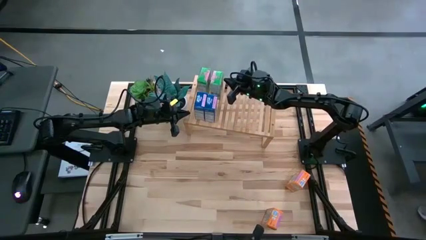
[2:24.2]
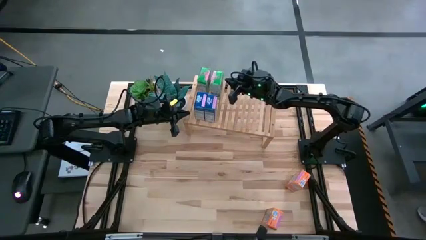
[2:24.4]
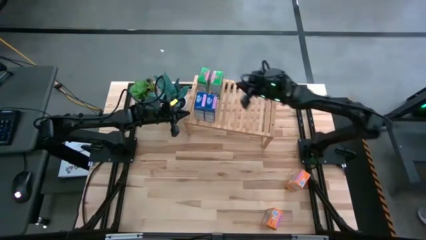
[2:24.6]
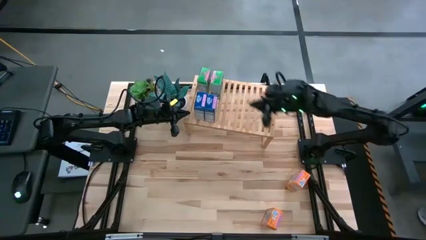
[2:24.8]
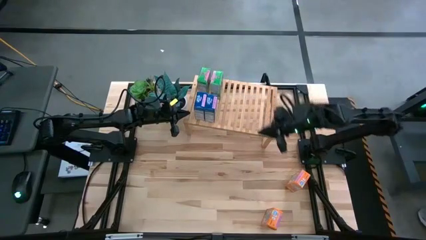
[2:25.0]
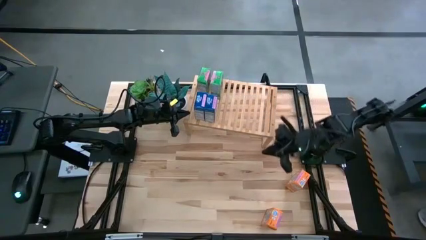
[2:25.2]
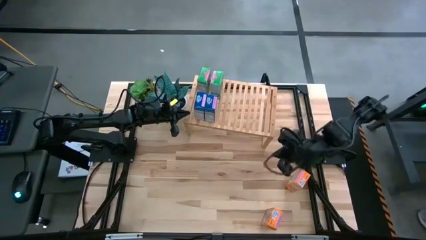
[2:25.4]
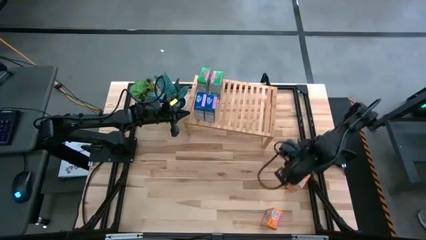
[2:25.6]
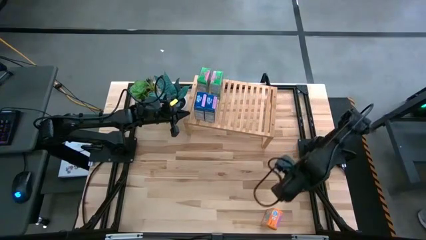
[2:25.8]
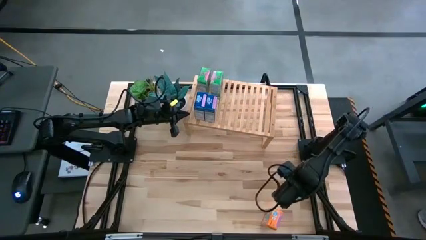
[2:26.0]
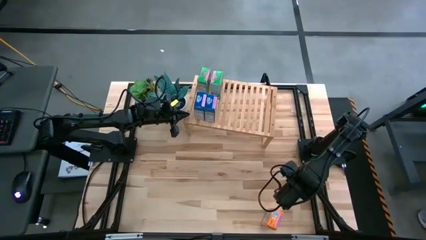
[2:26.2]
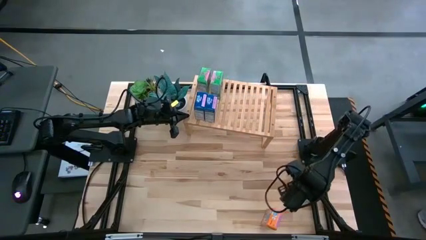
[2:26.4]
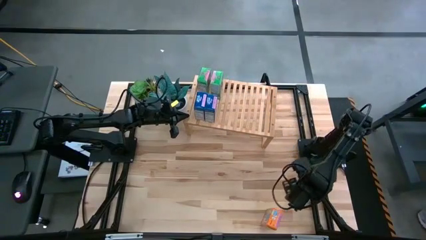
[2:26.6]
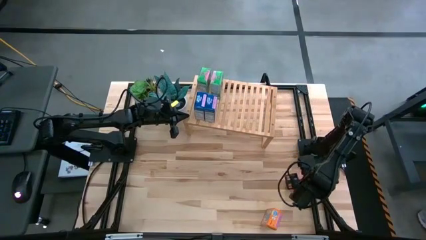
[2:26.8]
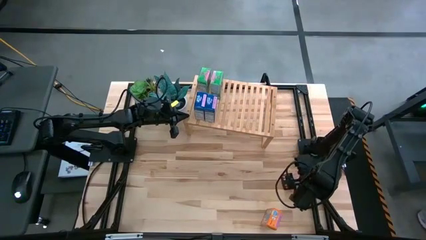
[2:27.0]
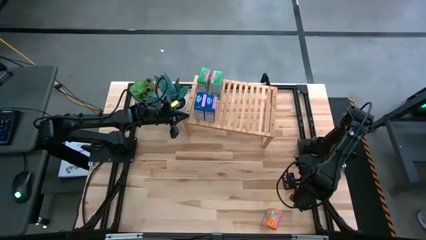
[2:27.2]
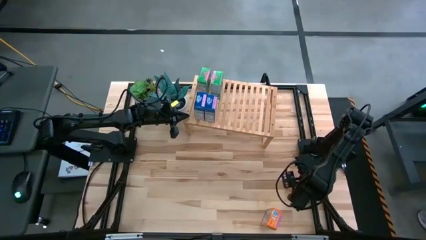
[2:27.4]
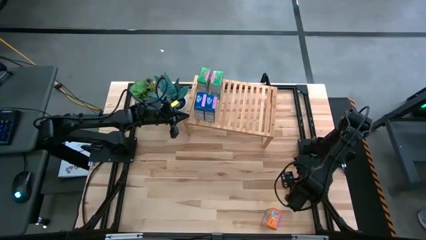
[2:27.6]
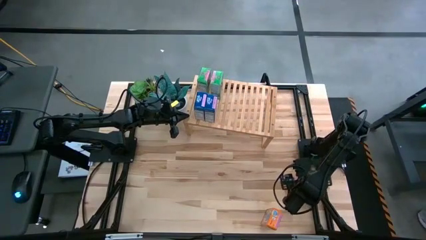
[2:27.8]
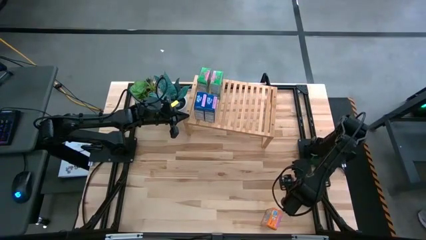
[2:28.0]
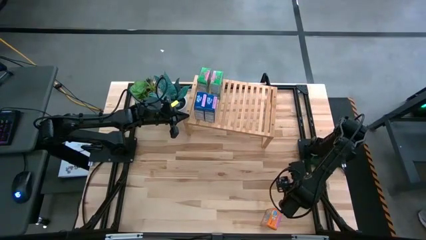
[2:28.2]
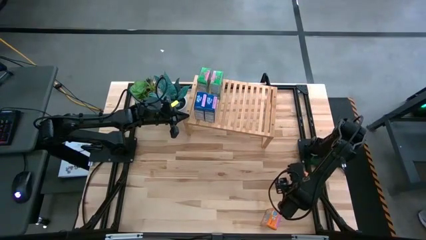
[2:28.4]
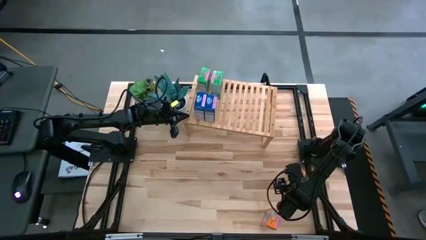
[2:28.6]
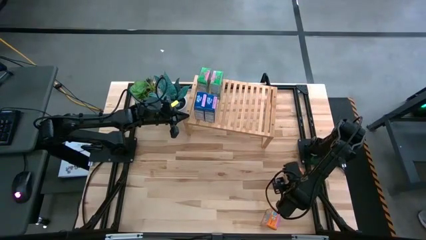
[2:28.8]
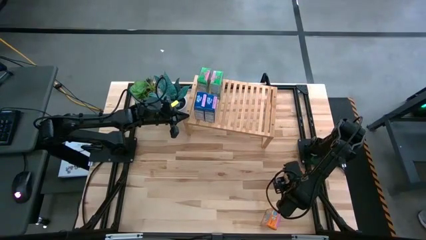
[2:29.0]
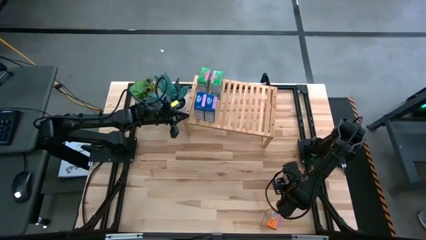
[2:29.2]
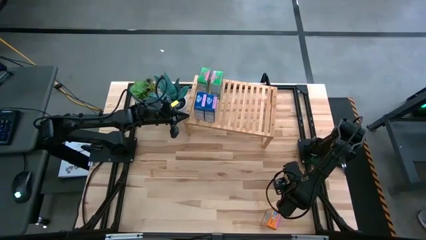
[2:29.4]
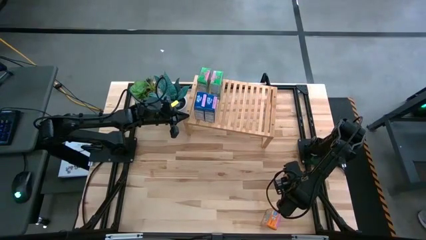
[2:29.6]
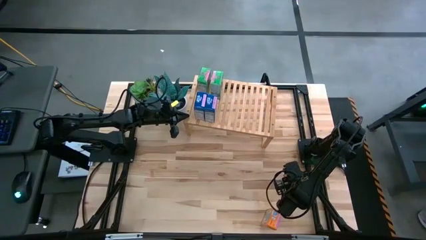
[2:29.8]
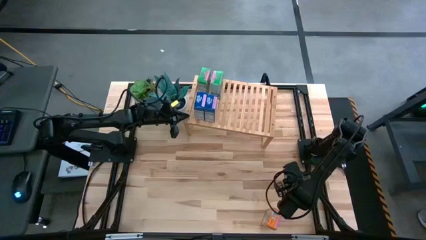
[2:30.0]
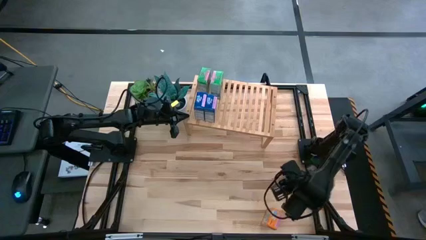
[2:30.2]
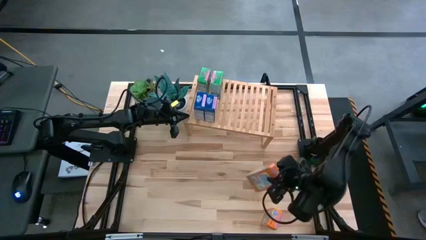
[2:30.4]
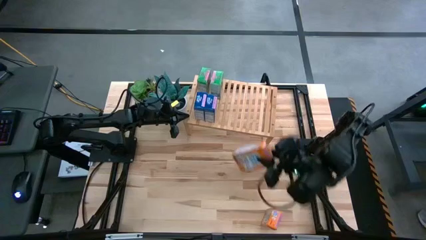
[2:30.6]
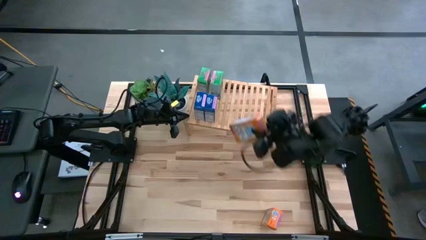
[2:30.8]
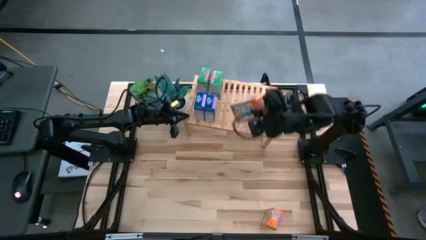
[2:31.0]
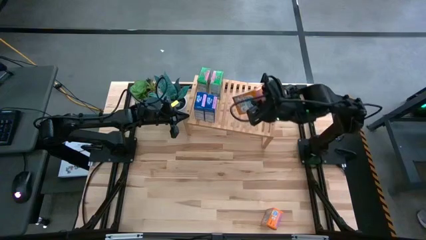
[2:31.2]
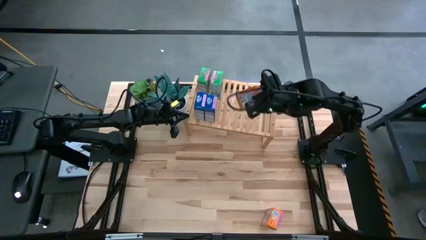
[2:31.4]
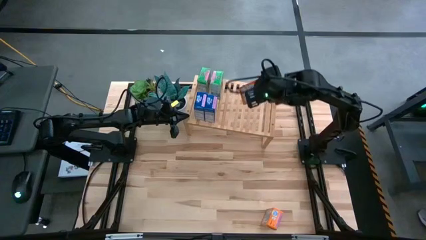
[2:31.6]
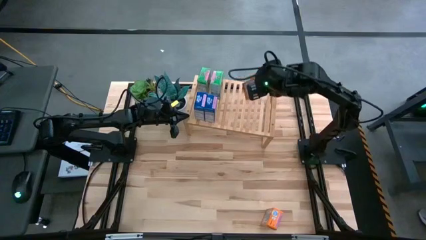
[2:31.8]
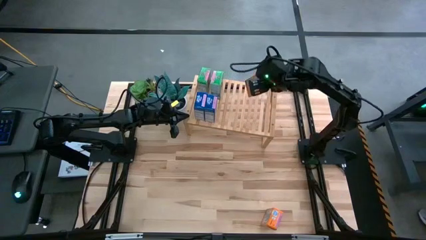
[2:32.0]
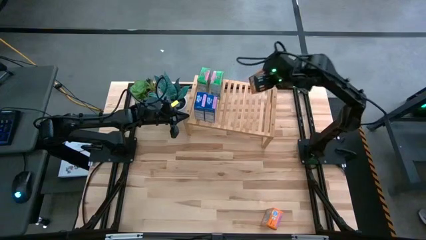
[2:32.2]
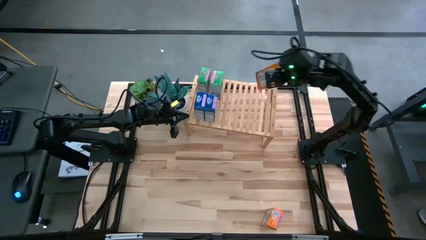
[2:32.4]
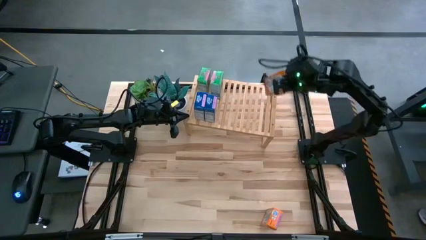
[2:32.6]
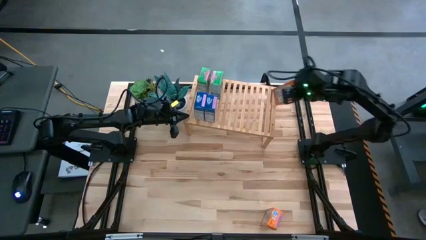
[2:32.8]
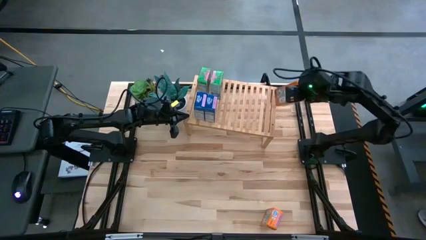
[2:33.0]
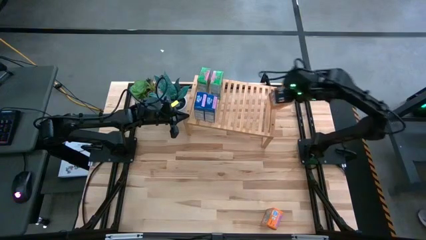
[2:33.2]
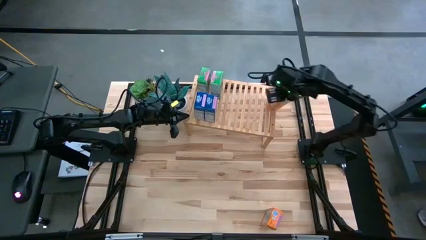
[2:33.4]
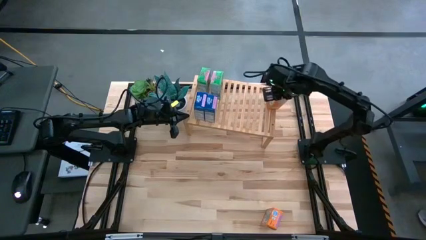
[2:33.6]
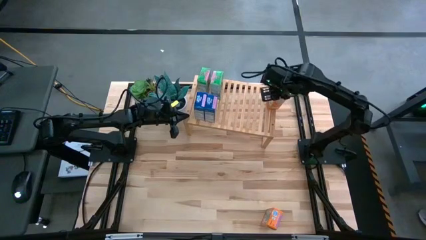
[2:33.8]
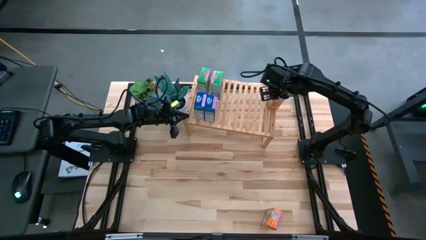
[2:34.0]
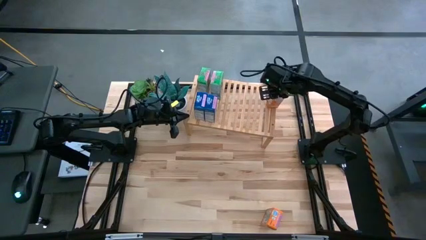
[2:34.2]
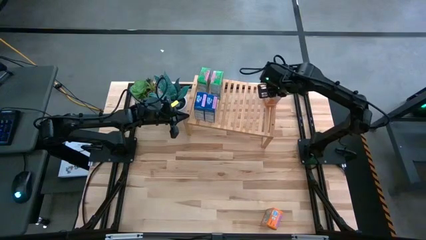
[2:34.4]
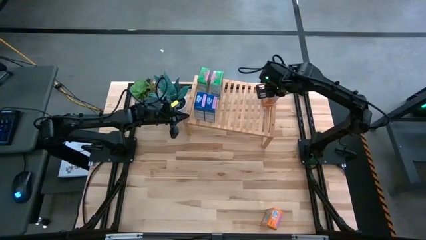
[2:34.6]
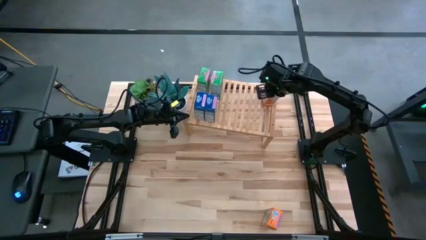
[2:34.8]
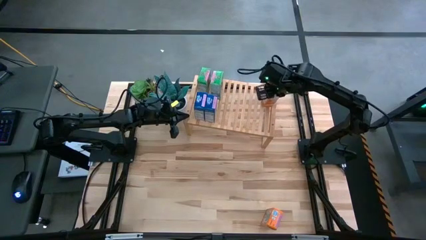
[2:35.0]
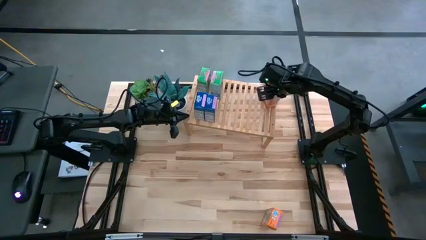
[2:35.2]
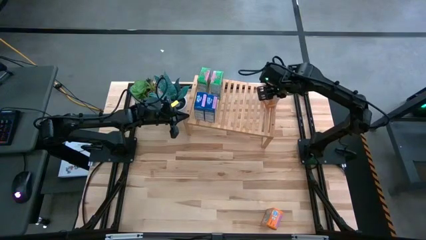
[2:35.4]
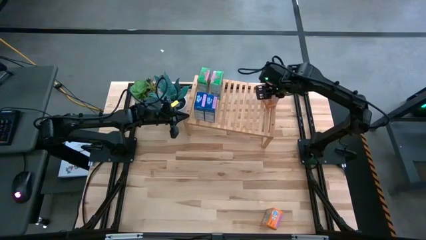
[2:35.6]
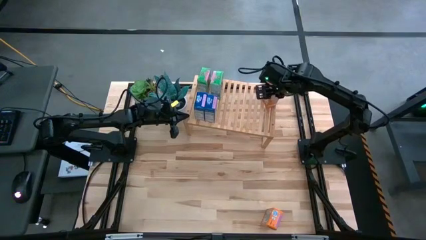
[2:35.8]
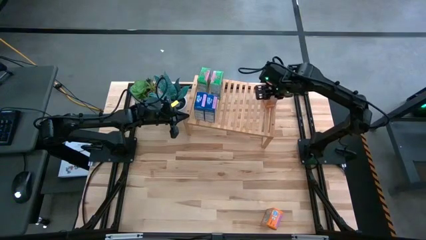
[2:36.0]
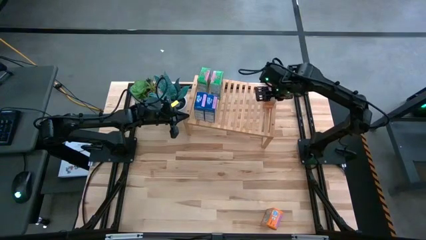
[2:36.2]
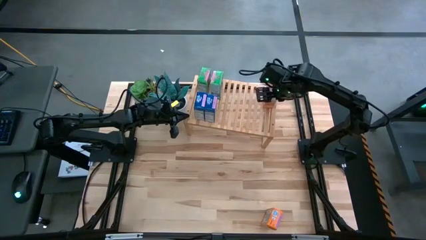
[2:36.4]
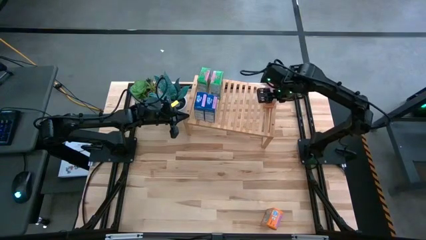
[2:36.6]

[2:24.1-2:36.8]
Task: Stack cereal on shelf
Put the top orange cereal box on the shelf

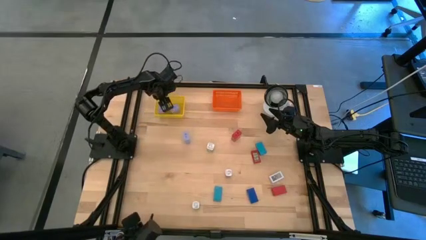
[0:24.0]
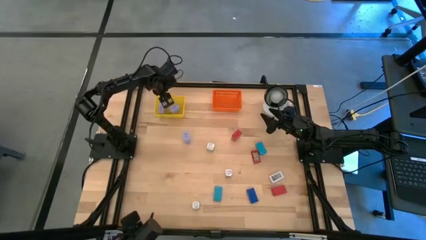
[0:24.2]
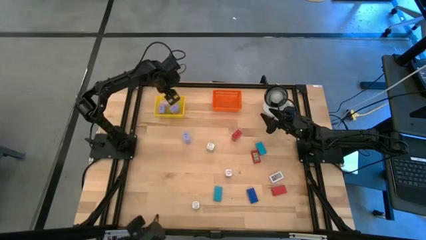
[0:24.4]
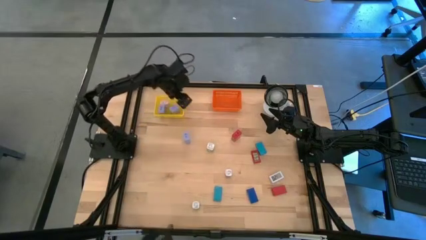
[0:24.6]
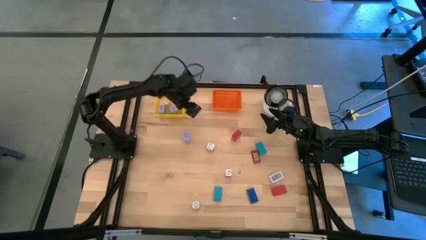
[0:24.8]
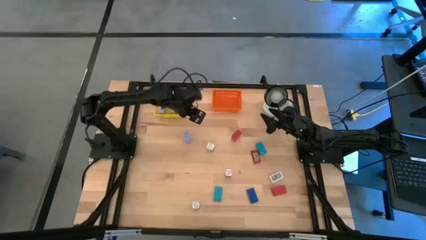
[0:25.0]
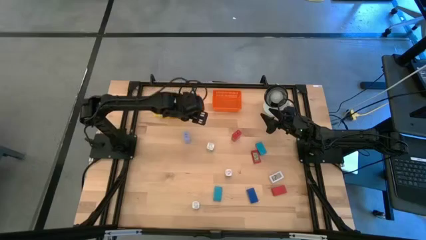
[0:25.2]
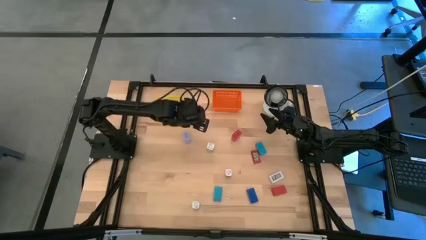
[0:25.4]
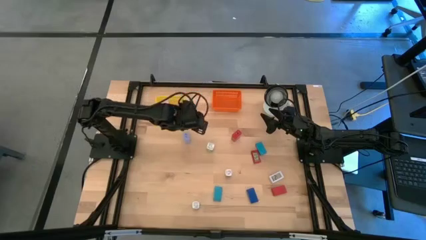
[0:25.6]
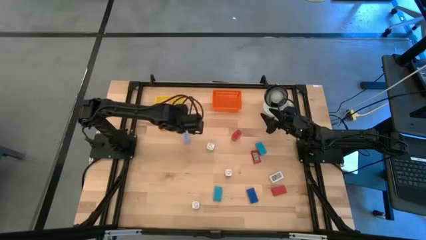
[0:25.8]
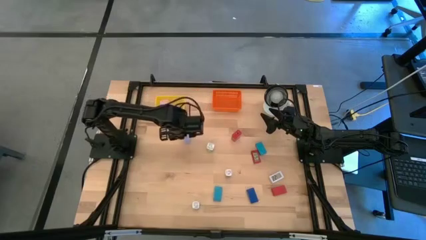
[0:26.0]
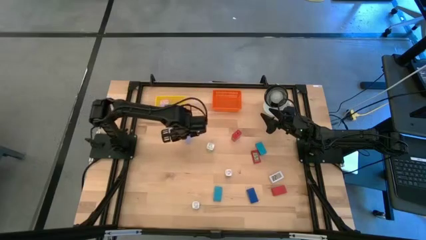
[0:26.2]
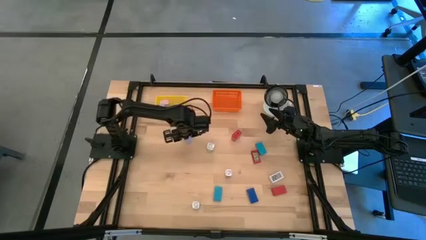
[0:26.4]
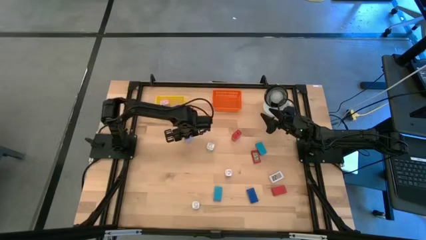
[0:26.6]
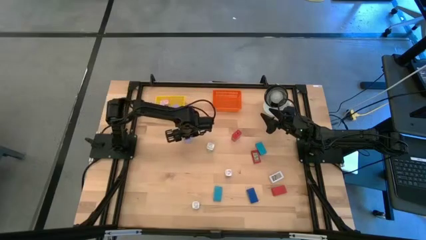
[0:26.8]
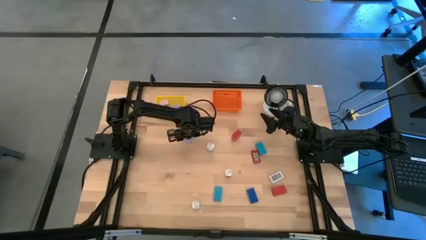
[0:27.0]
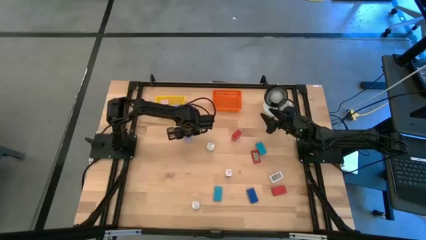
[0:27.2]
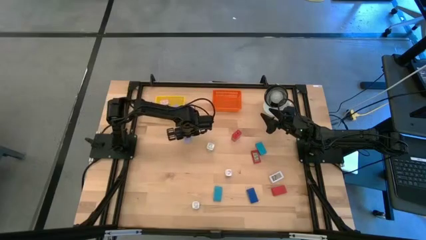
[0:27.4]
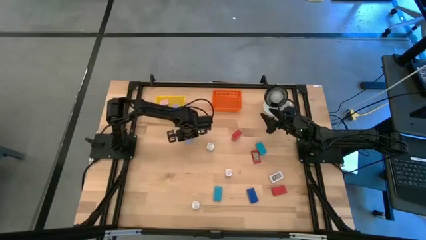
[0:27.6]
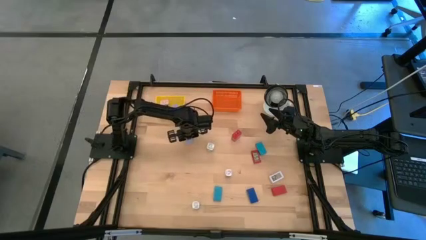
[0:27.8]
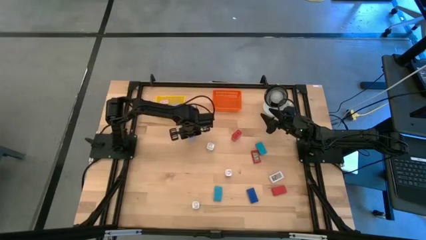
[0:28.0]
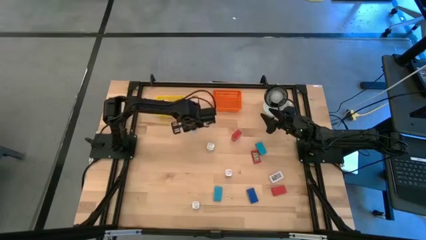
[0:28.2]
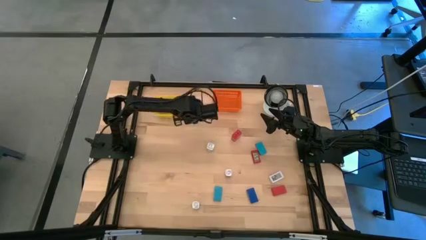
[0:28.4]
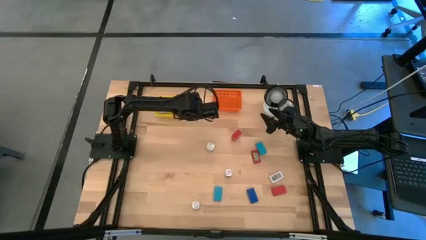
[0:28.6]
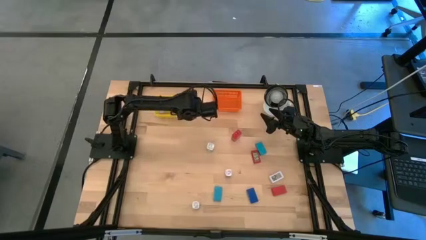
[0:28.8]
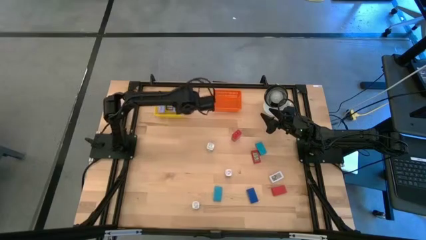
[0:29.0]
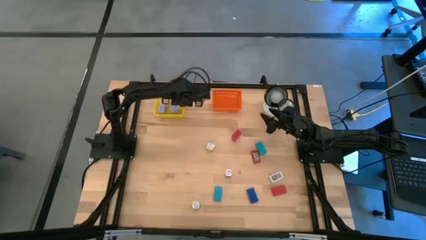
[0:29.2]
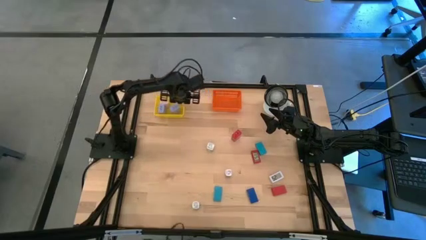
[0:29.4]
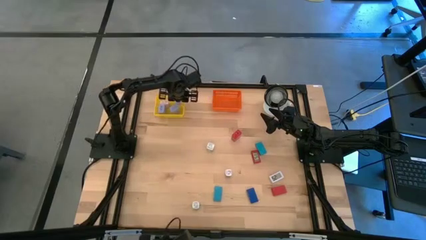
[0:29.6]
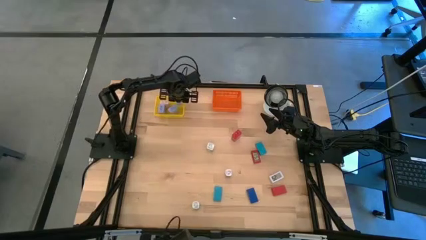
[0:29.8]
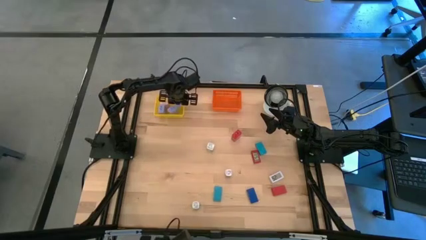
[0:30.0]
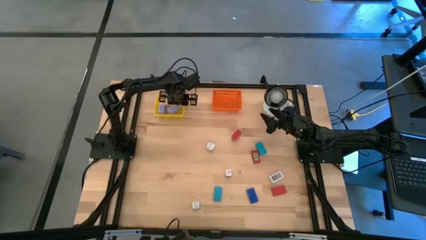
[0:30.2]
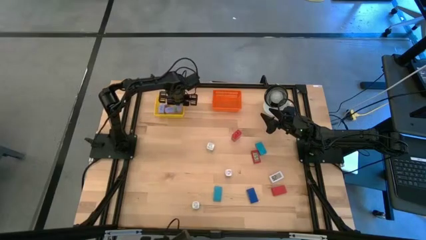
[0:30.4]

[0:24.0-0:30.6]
Task: Pick & Place Office items
Put the light blue changer adapter into the yellow bin
